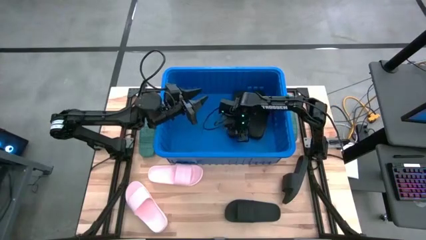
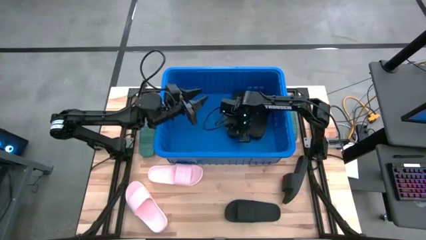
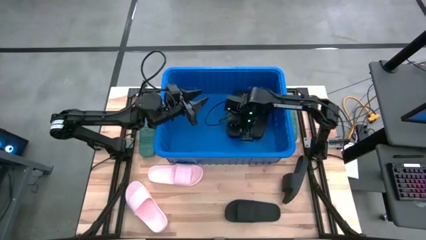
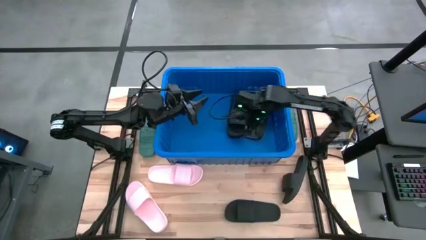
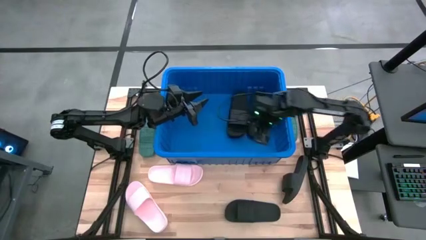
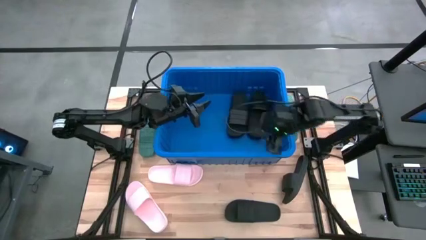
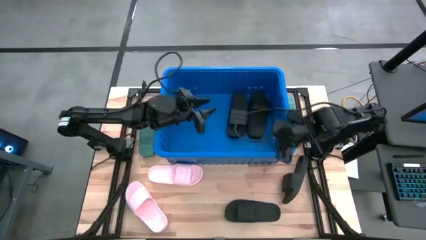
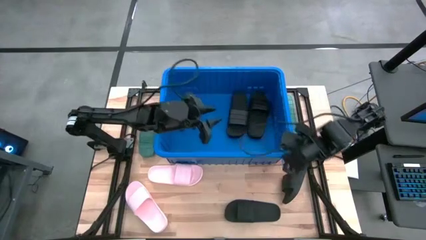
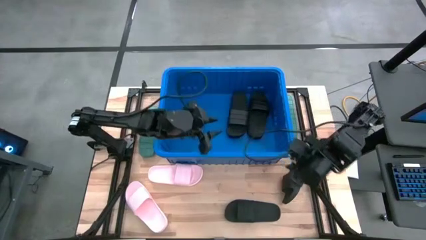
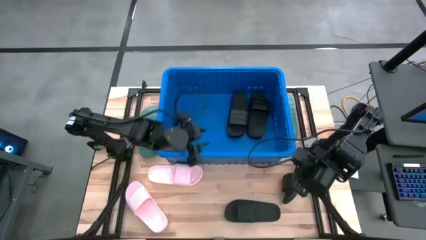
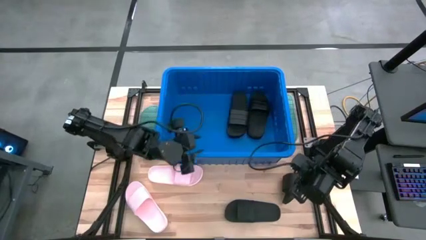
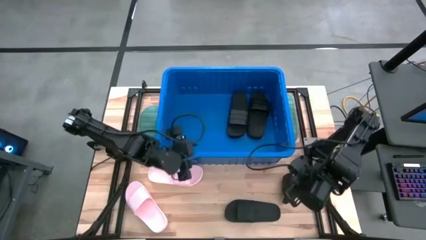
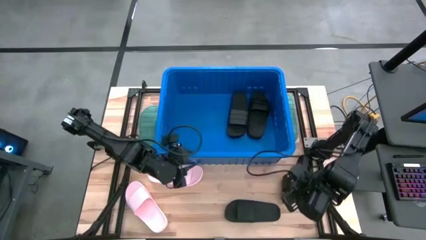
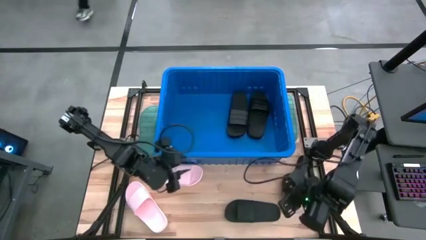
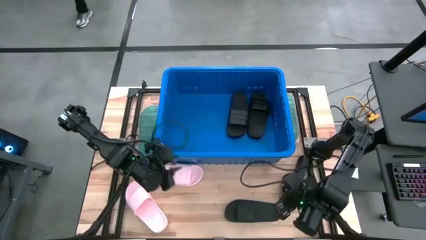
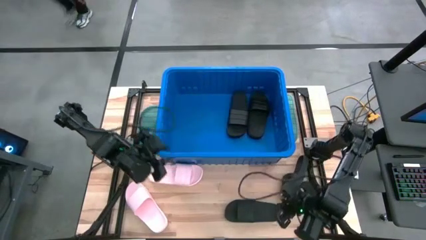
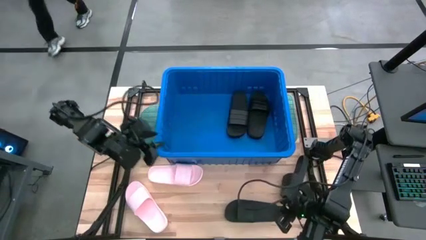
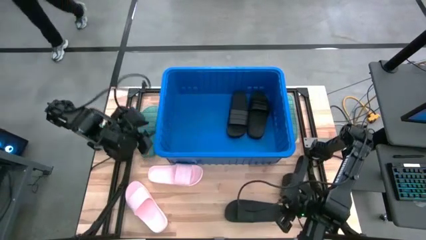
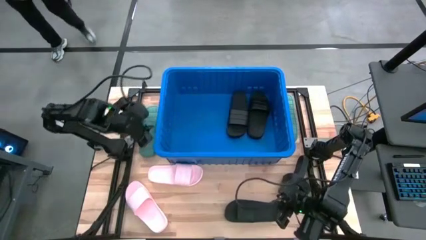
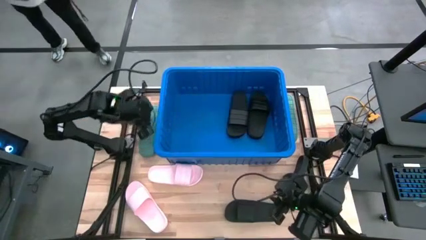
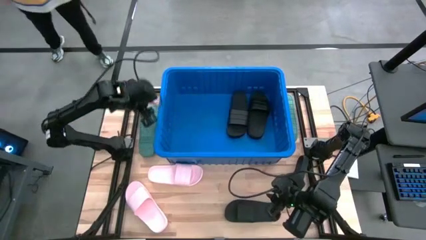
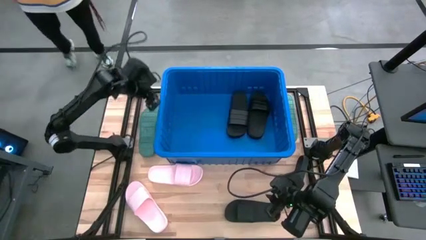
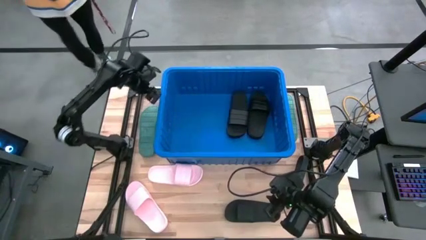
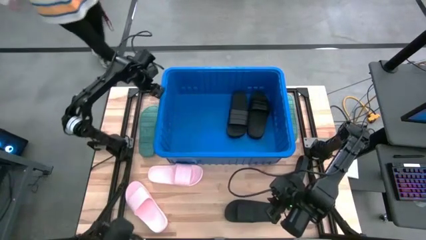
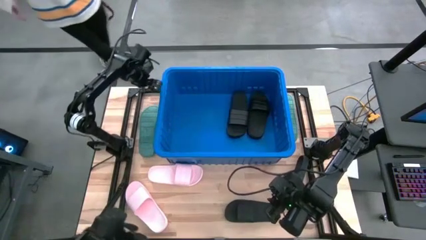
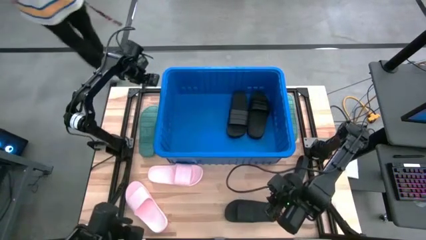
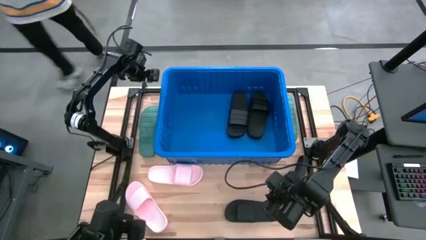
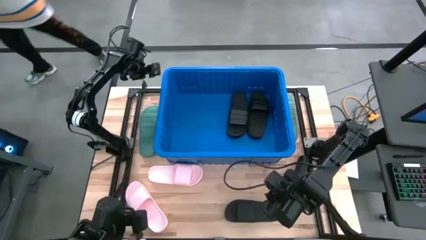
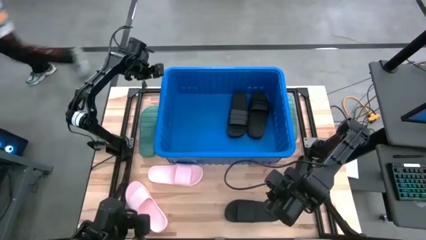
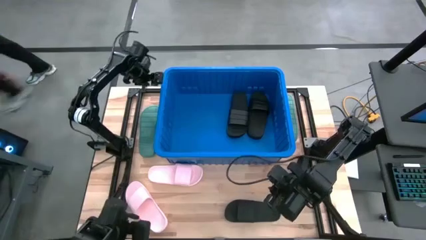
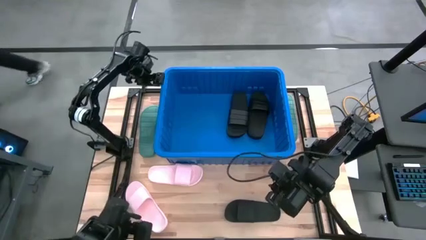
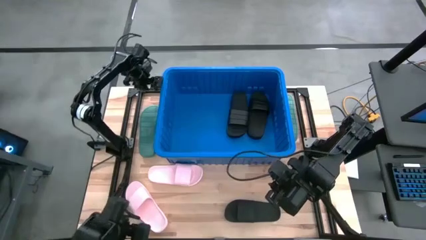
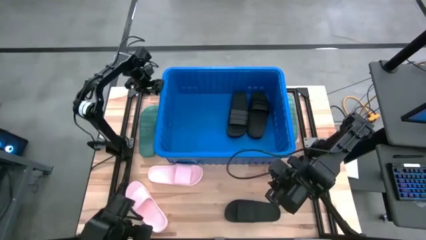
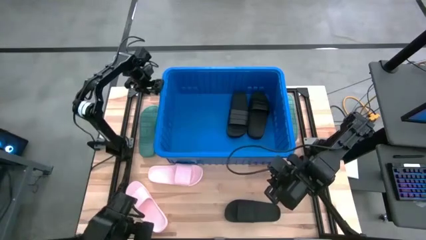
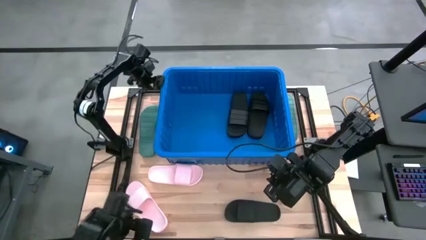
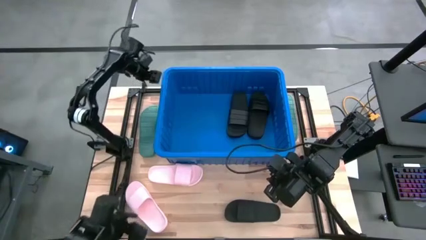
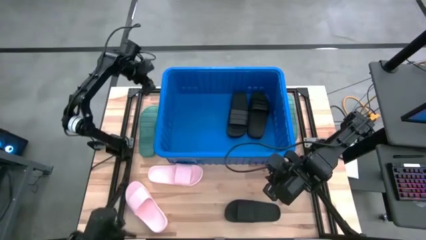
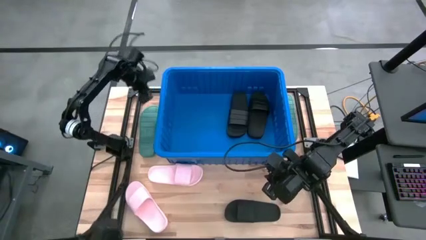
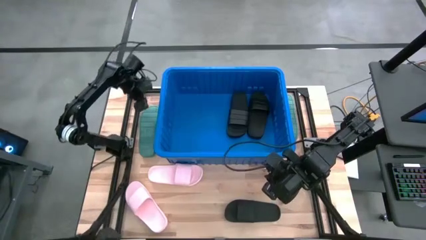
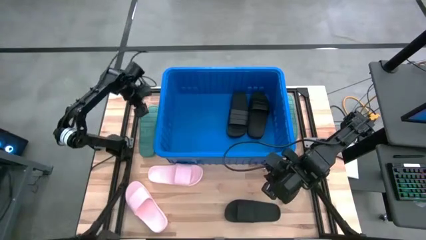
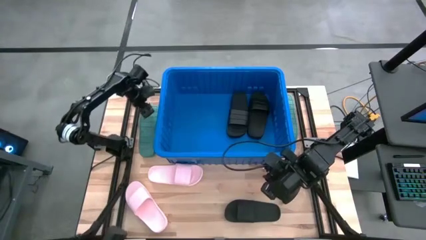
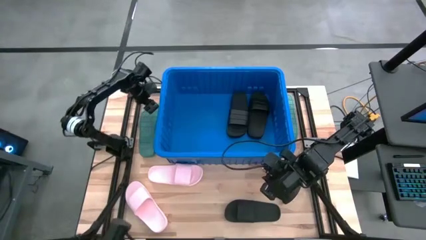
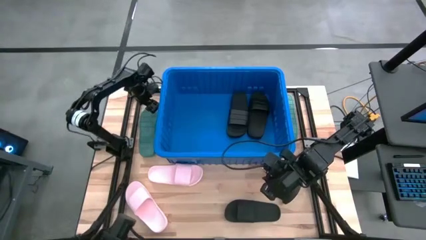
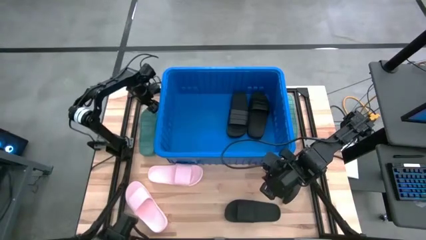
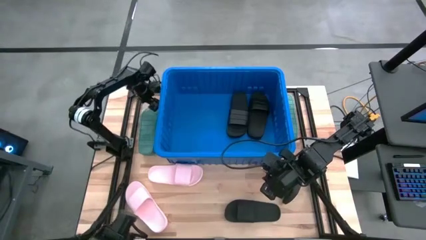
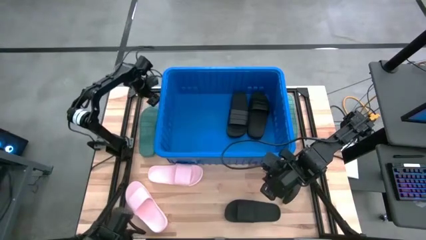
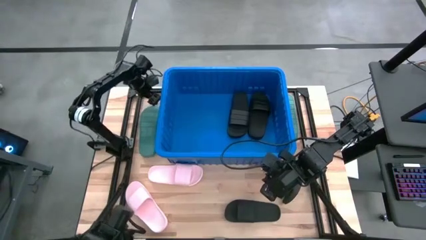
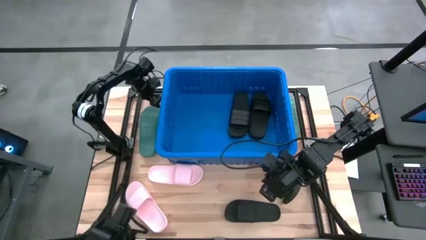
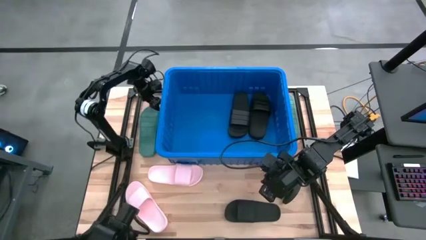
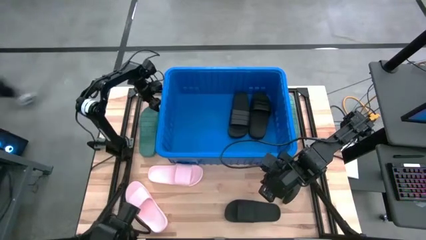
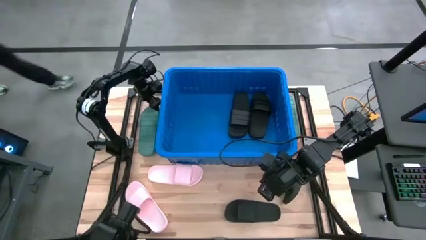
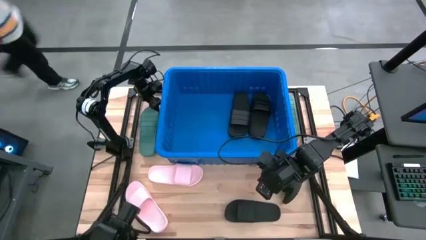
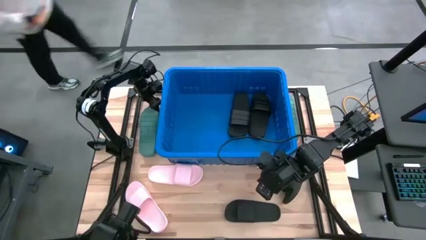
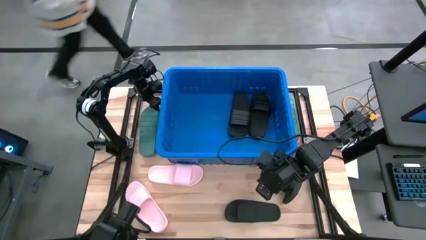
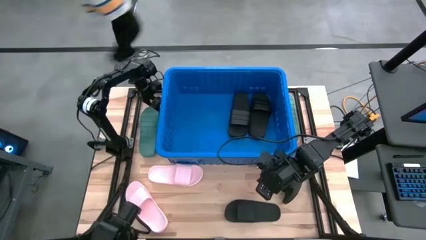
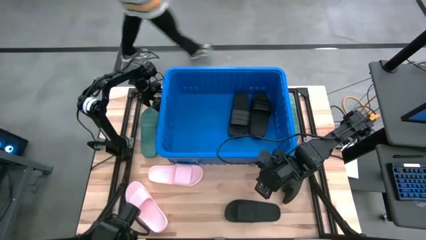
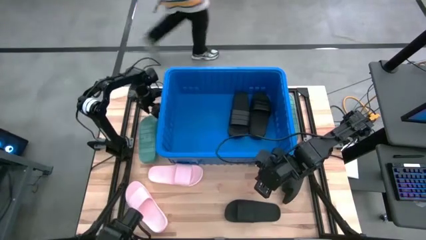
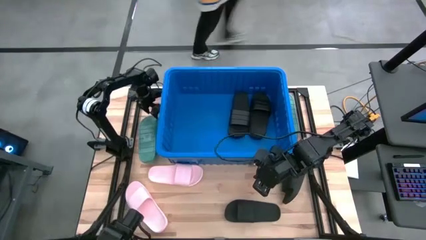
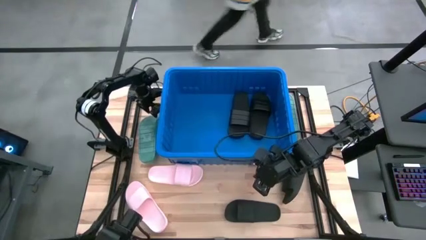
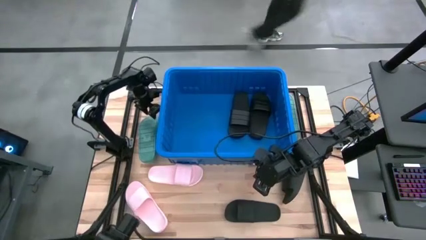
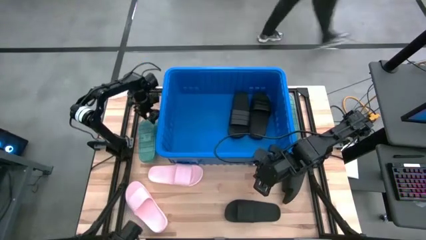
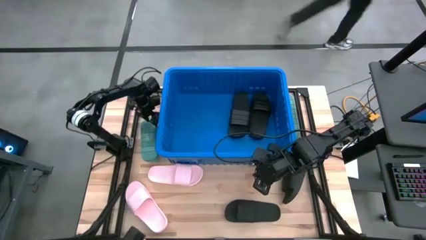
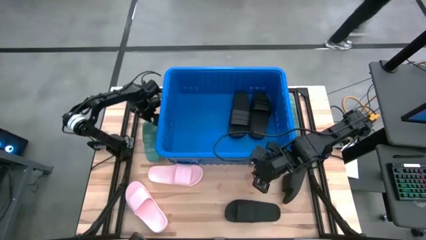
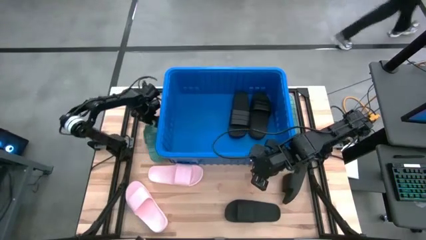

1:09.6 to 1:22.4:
Task: Pick and place slides into bin
Put the green left slipper into the blue bin
